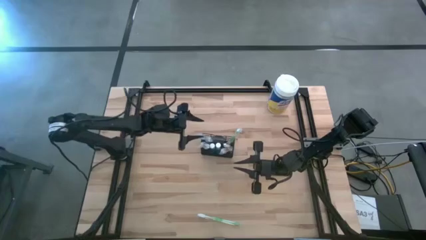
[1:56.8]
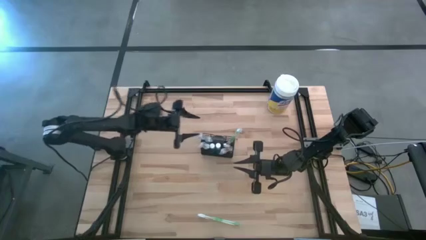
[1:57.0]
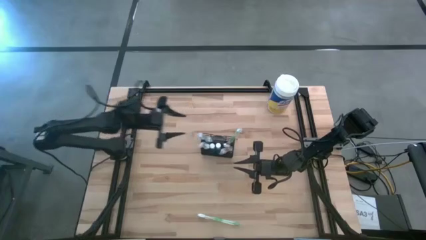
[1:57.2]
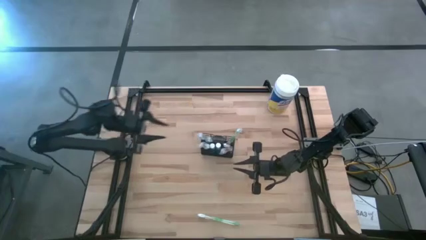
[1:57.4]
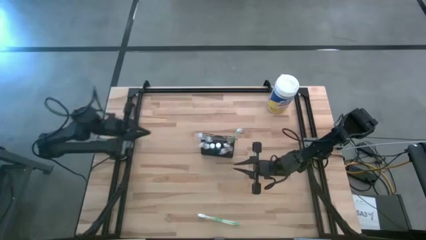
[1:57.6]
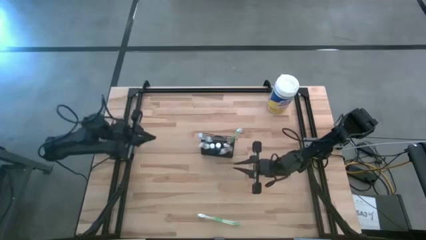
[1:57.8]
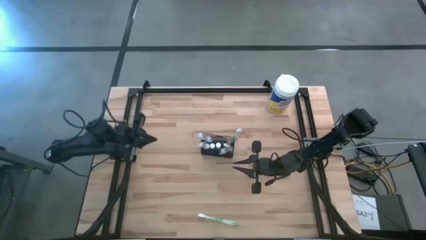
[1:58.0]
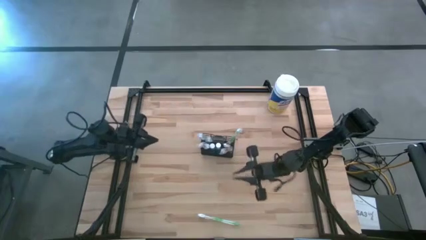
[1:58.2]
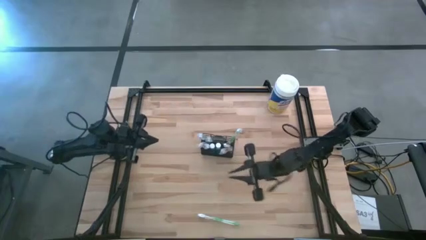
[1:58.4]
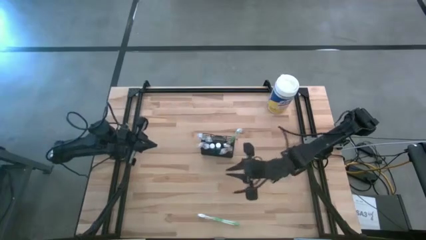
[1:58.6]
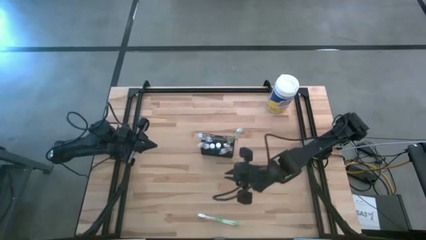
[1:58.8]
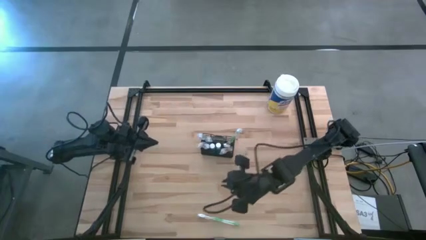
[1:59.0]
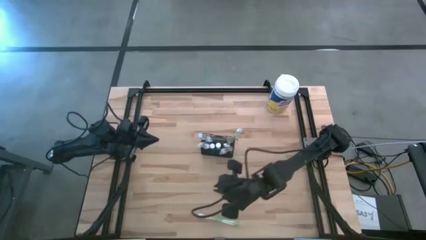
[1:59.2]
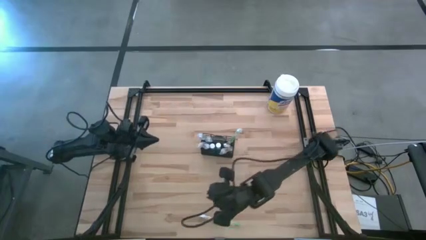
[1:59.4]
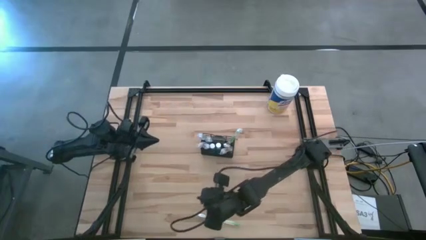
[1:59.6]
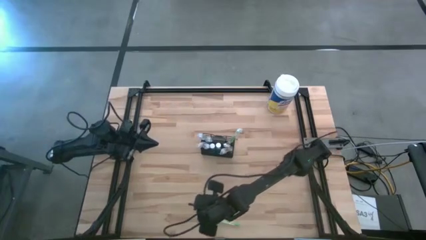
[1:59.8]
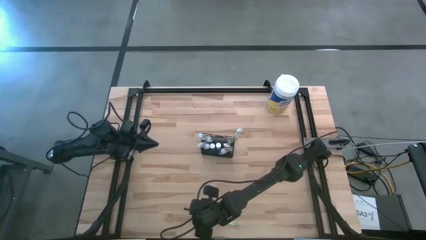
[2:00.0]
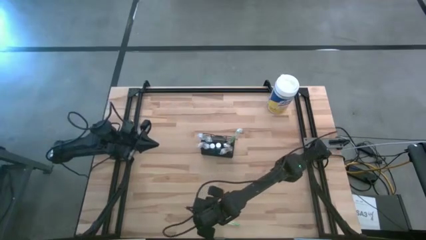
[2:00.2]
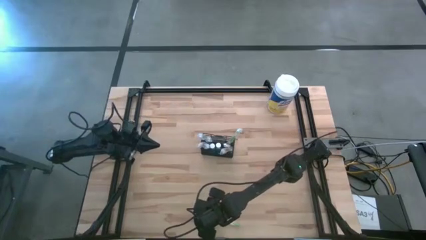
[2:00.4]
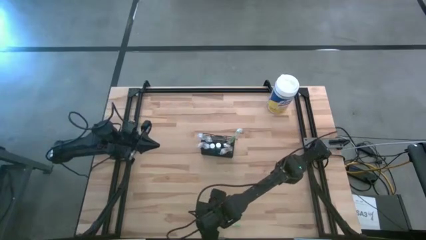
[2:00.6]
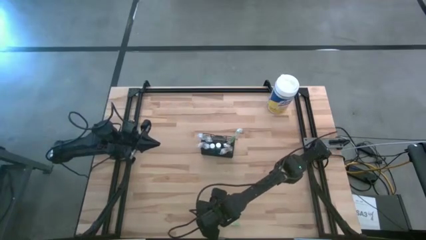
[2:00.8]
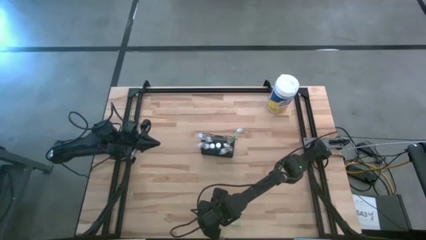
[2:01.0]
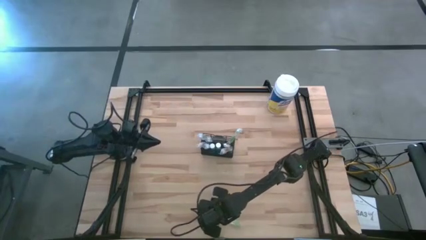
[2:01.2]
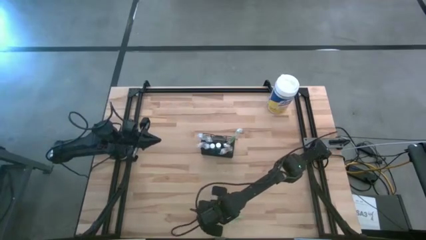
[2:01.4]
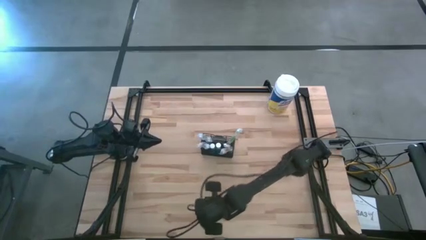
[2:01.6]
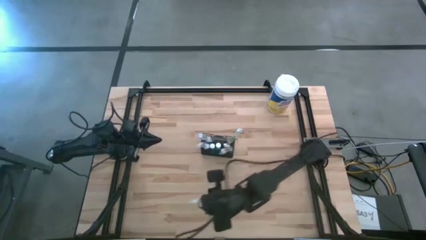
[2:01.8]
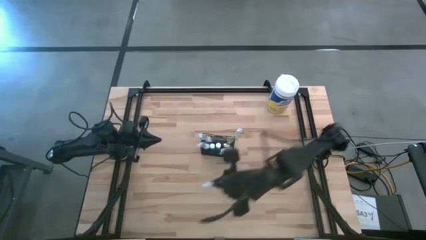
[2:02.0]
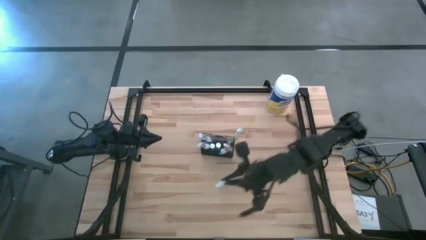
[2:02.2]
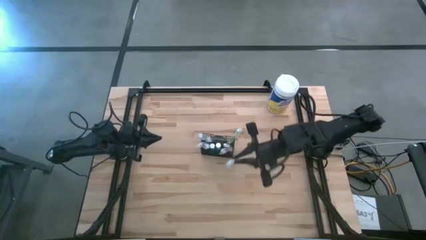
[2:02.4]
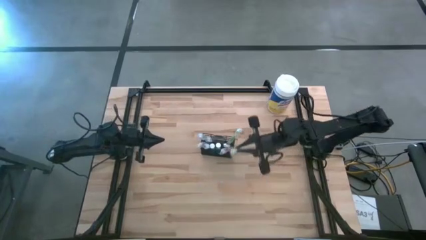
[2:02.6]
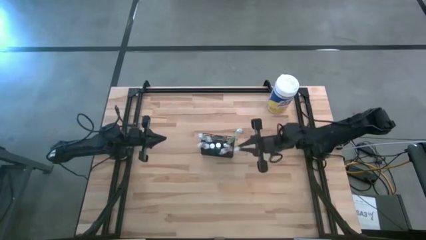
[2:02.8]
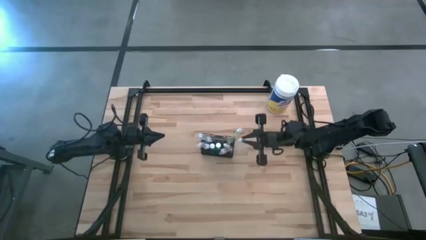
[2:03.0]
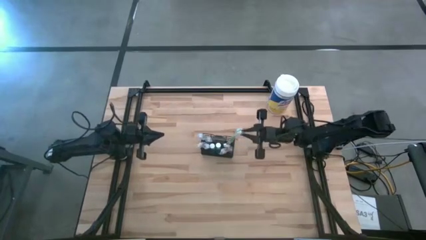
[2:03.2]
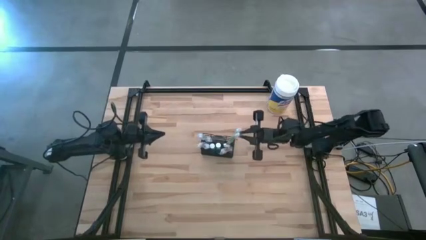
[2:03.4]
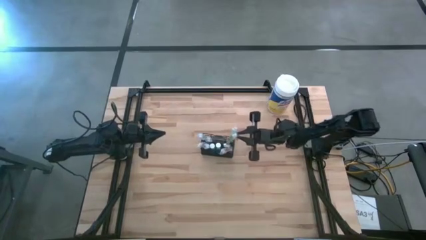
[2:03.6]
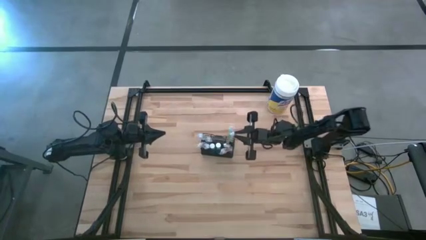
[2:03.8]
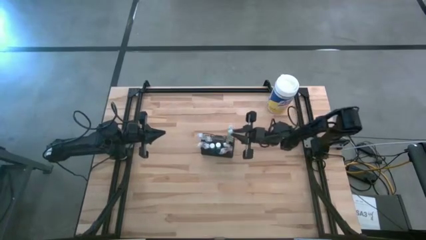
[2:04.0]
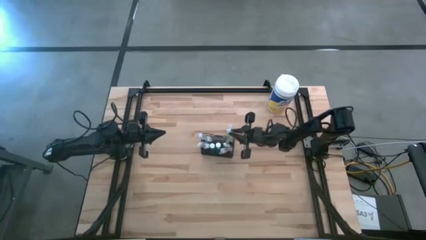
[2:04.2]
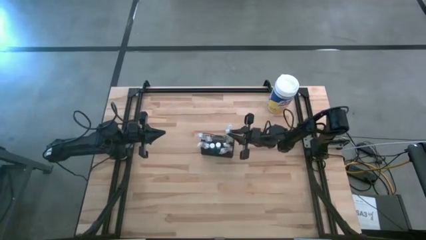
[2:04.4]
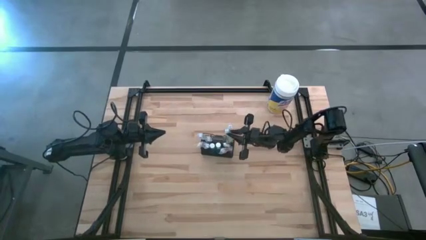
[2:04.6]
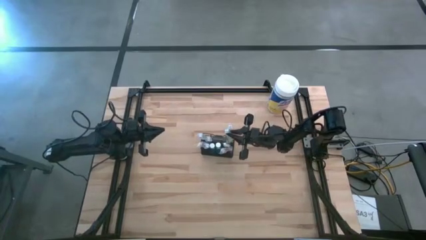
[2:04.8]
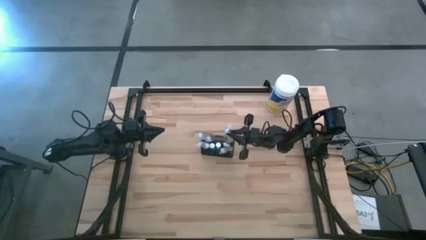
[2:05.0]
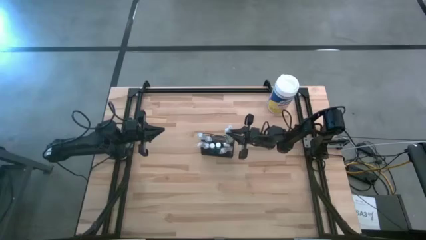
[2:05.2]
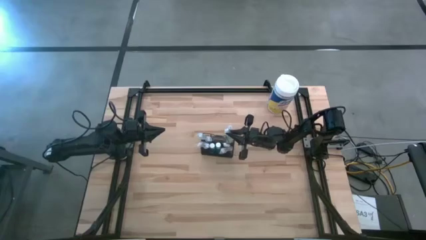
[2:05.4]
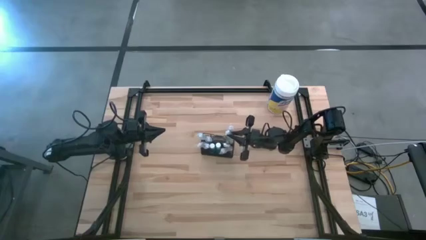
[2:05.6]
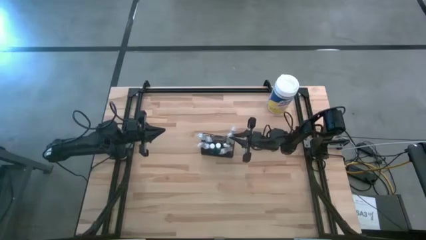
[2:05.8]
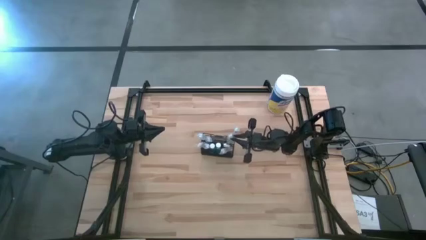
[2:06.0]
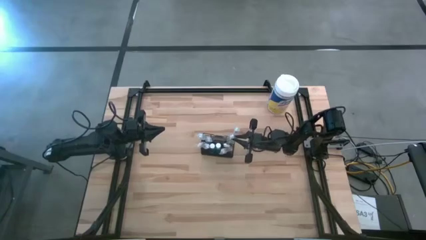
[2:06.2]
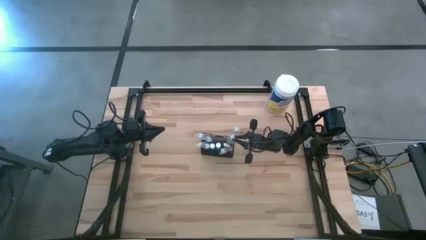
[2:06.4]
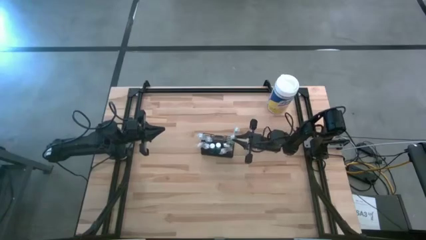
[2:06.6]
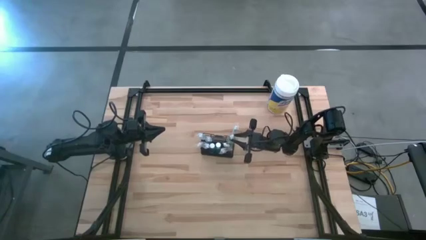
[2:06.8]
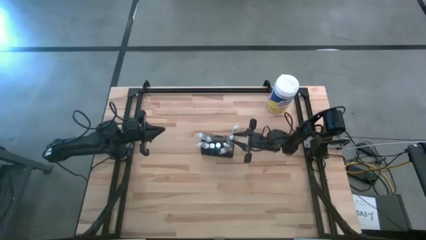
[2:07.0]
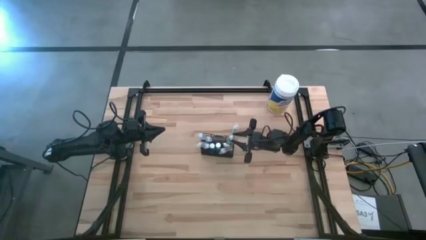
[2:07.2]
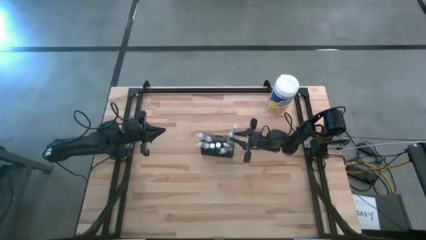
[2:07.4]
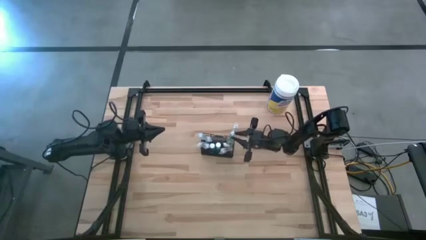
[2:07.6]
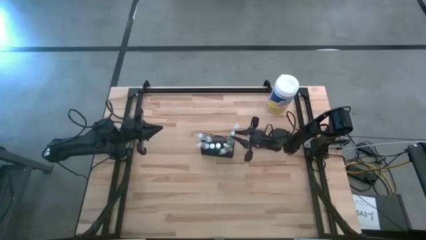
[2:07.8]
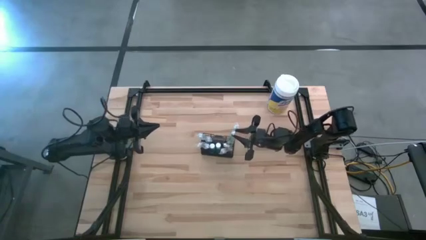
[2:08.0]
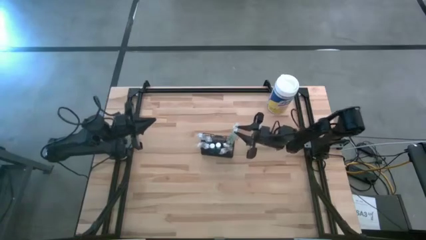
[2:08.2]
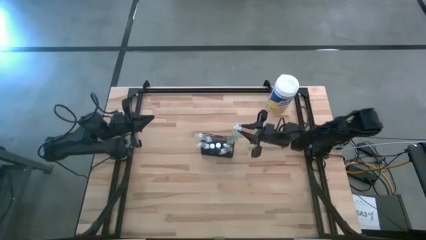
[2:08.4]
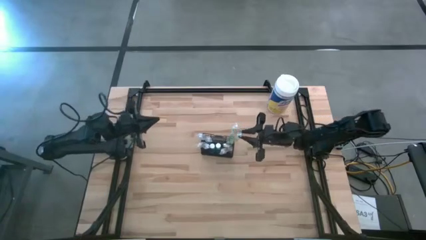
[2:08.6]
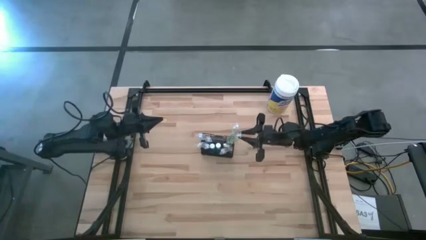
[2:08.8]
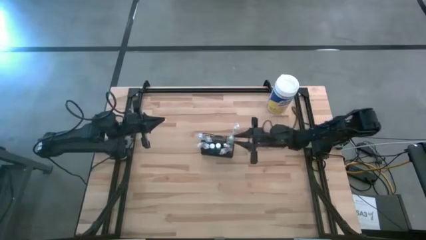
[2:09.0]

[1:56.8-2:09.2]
Task: Pick & Place toothbrushing station
Put the green toothbrush into the wire organizer

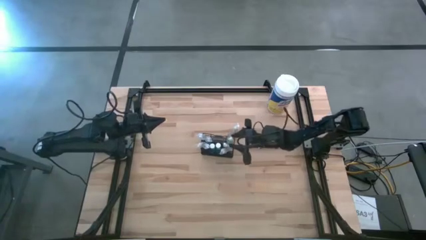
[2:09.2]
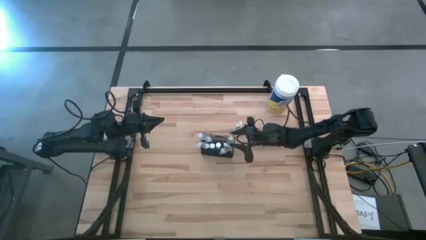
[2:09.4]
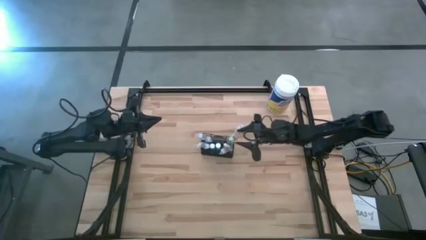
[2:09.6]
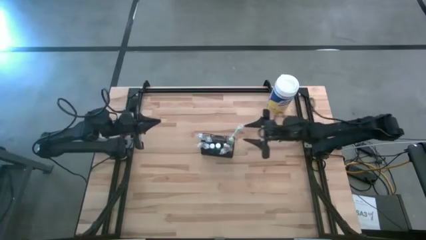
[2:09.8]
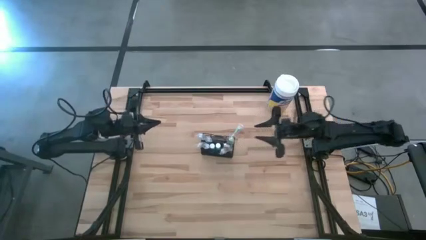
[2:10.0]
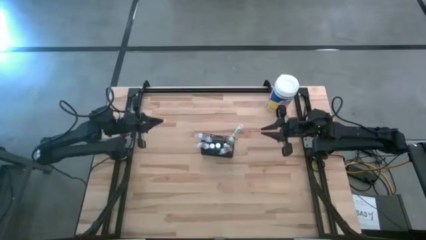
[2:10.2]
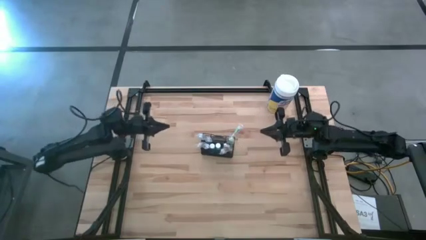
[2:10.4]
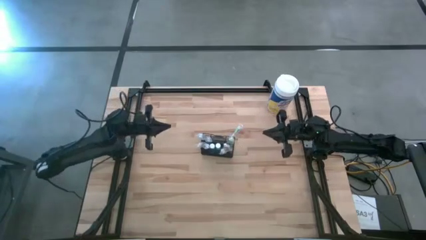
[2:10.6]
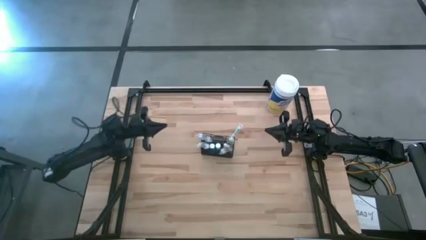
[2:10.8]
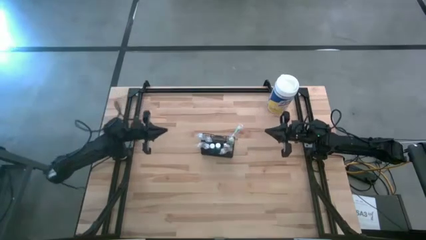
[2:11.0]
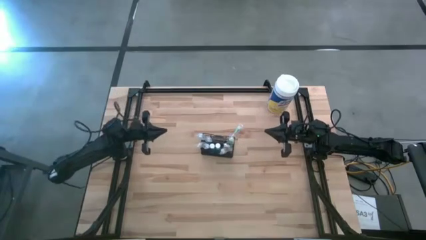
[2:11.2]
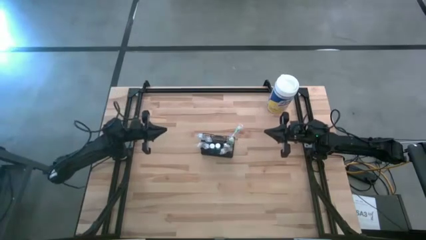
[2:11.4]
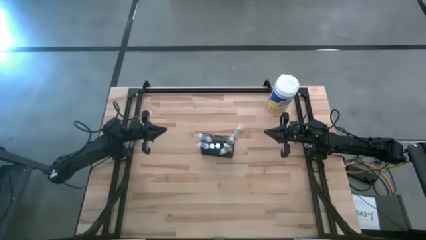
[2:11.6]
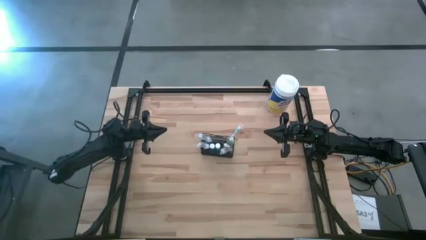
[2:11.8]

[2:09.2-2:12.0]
Return to Home Position

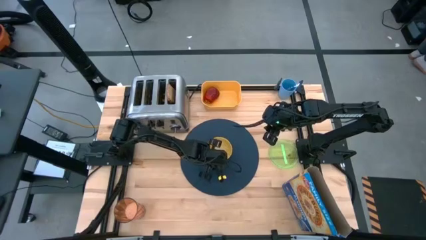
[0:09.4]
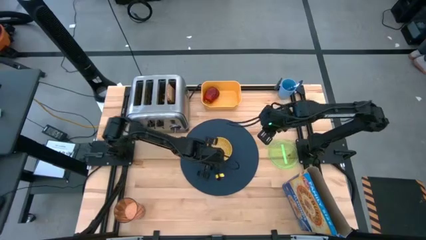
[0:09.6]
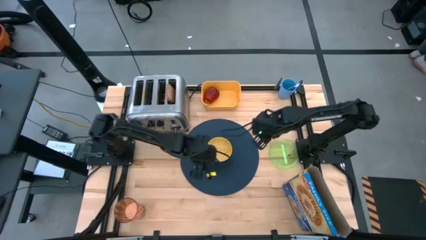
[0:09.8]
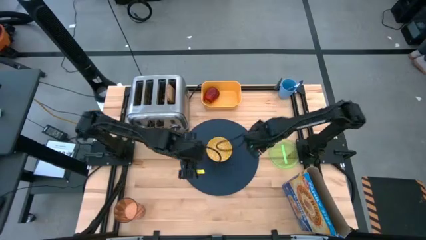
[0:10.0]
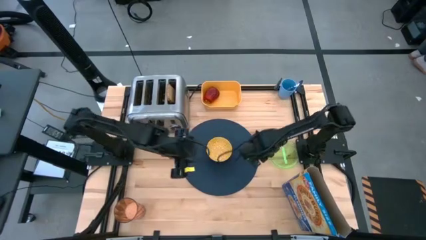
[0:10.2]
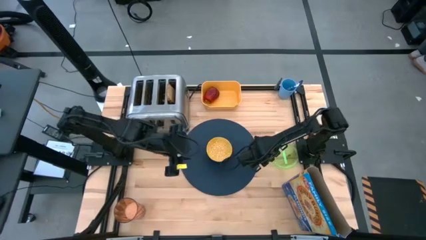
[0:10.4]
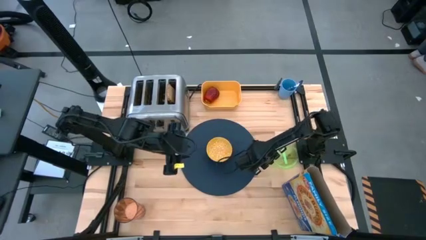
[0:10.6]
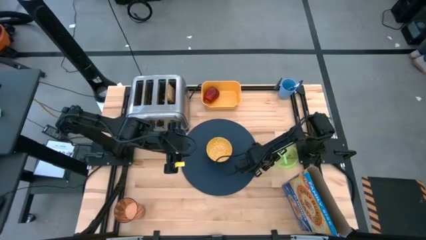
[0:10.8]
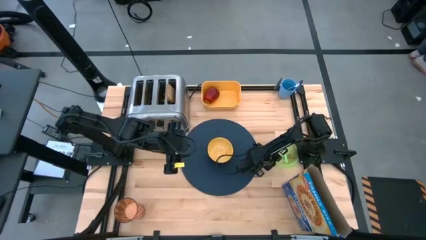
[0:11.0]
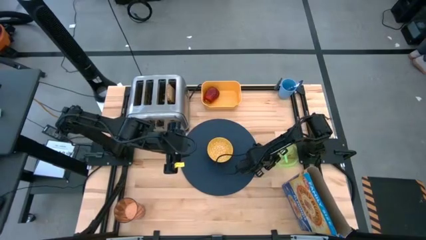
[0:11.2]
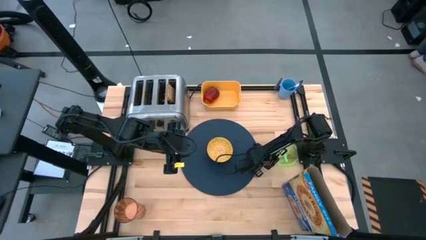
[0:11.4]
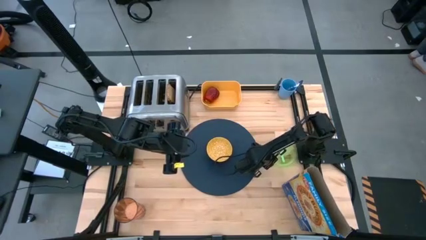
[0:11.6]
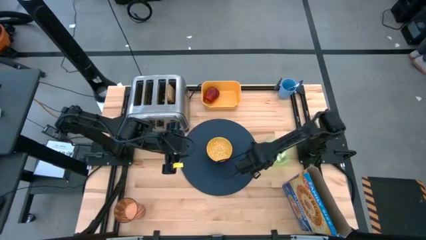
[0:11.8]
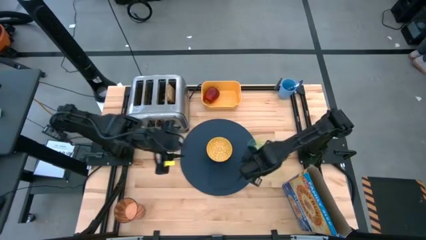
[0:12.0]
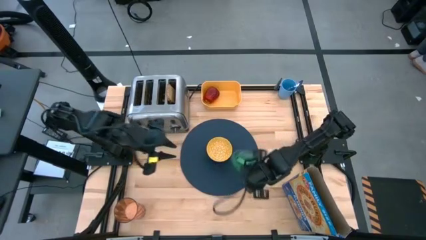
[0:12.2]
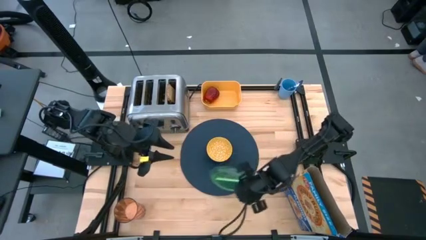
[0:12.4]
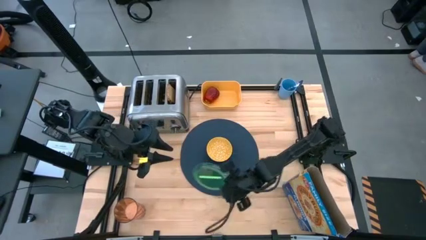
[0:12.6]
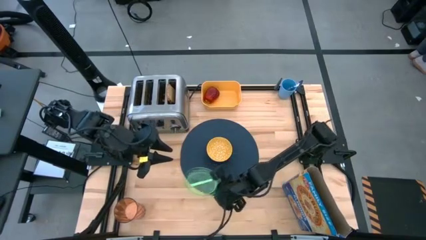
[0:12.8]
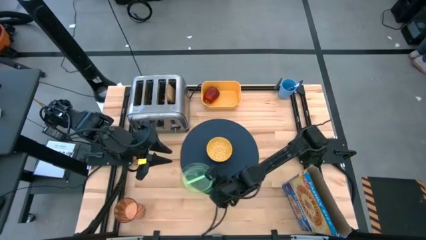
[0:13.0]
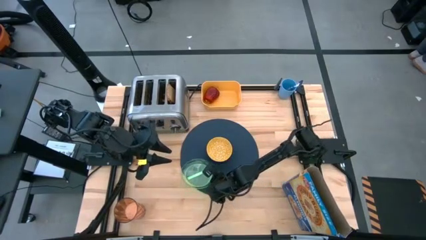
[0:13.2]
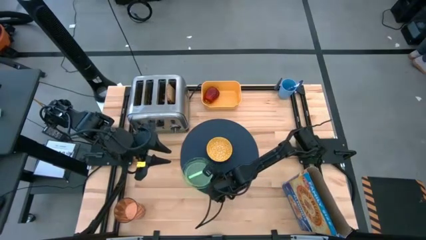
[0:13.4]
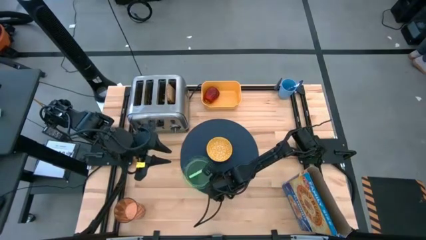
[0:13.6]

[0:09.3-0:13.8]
Task: Arrange a breakfast setting
Put the green plate on the table mat to the bottom left of the yellow bowl
